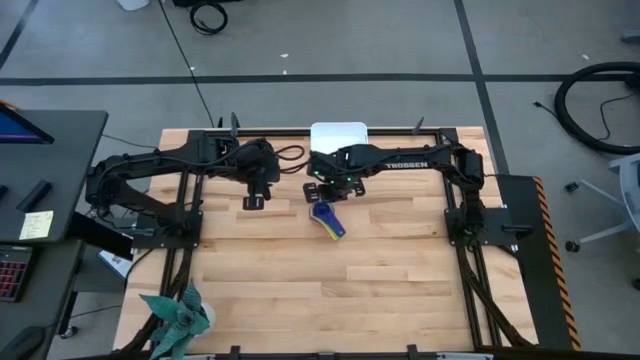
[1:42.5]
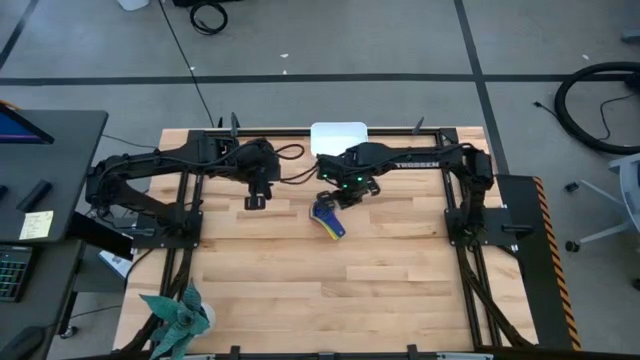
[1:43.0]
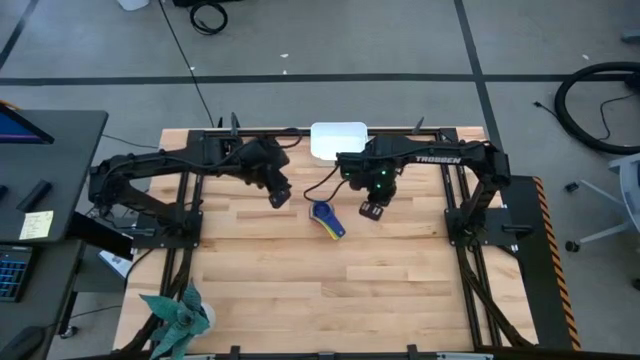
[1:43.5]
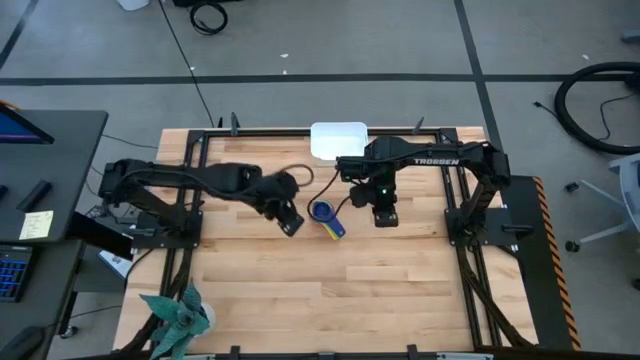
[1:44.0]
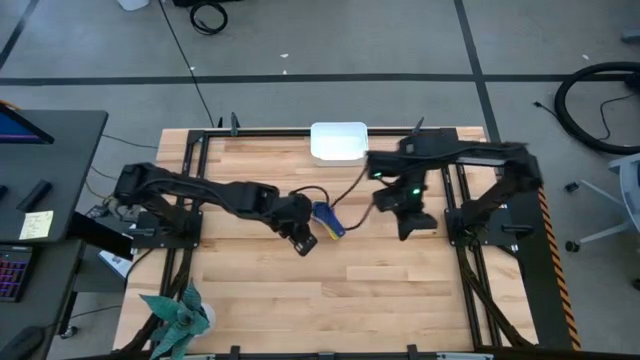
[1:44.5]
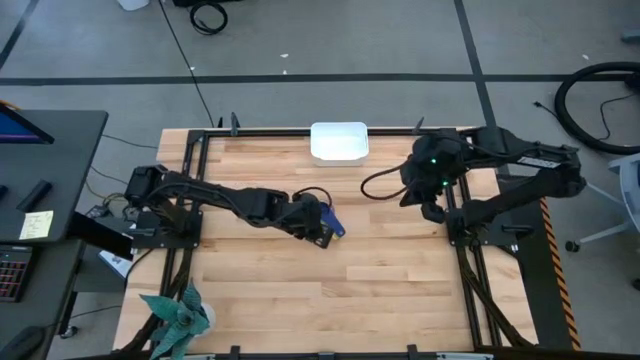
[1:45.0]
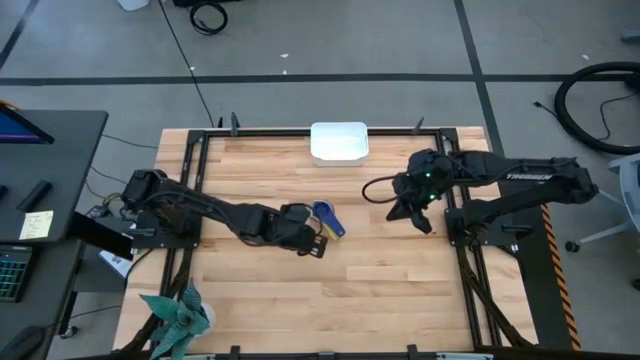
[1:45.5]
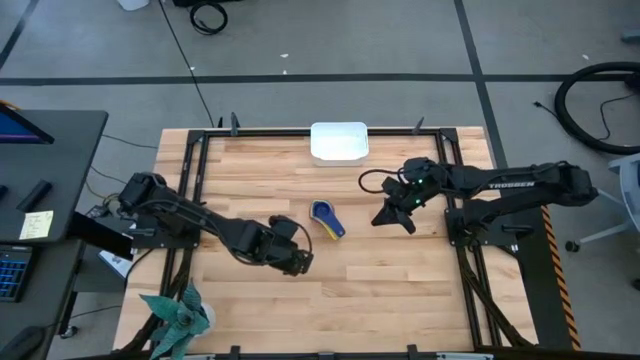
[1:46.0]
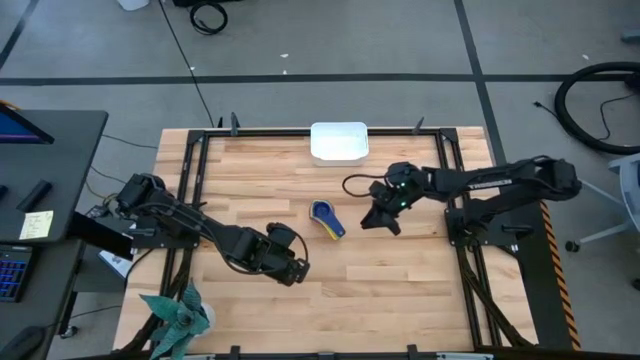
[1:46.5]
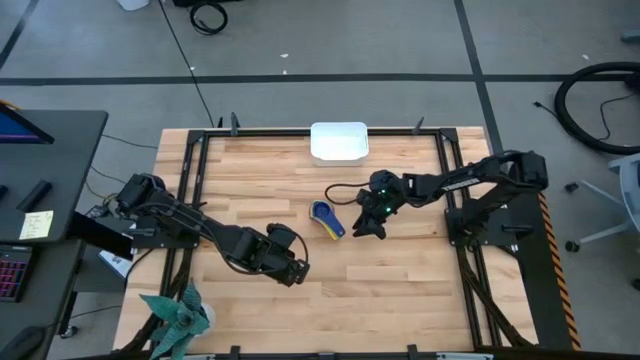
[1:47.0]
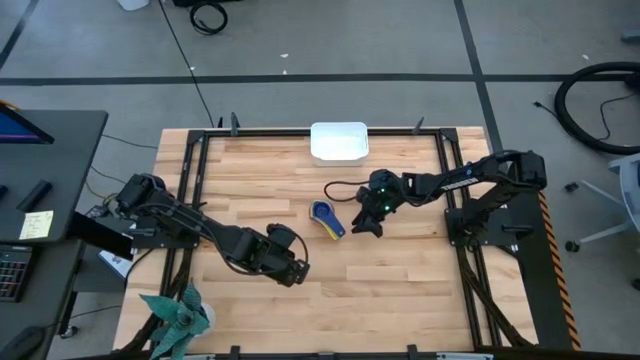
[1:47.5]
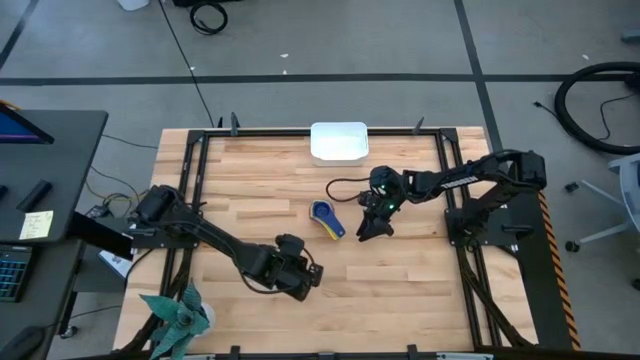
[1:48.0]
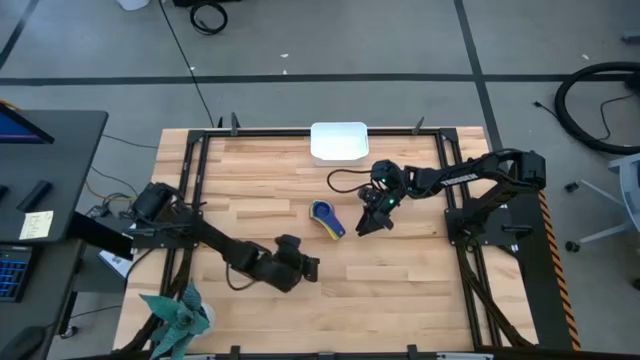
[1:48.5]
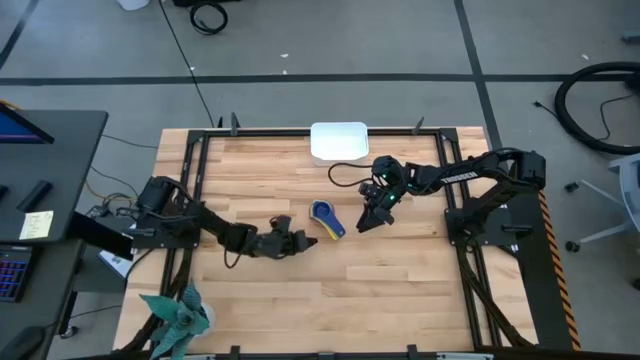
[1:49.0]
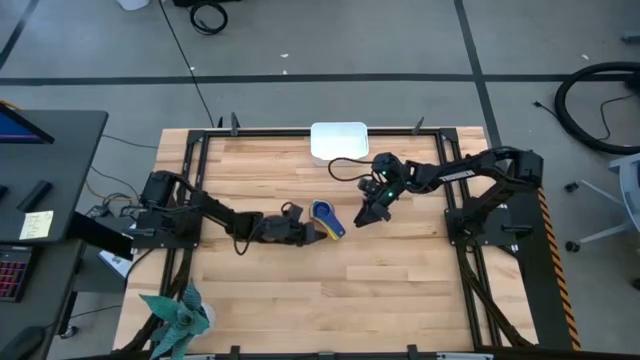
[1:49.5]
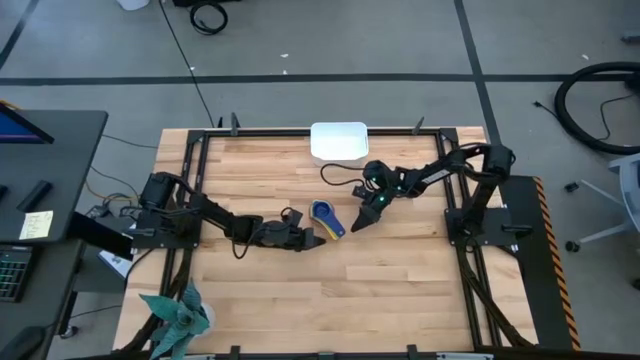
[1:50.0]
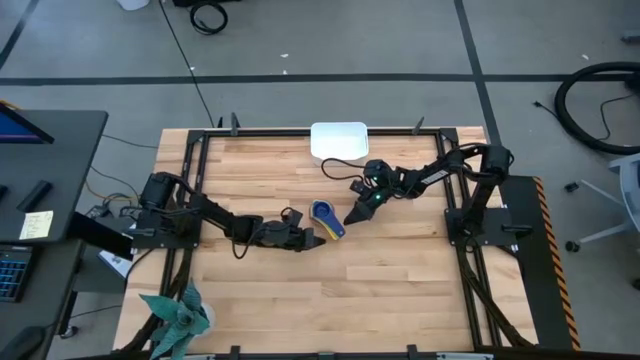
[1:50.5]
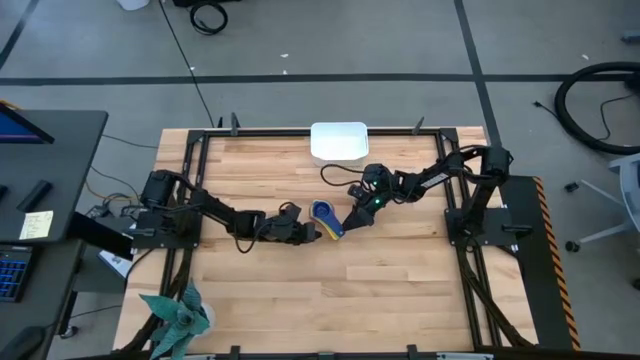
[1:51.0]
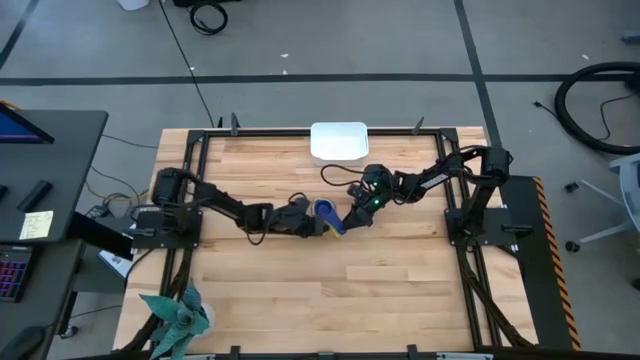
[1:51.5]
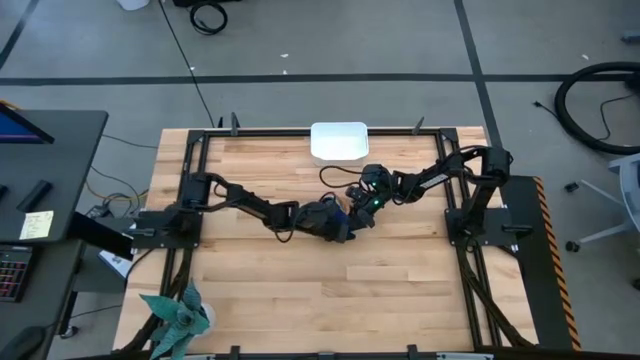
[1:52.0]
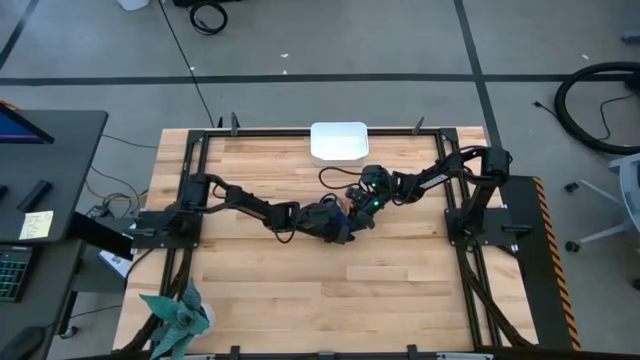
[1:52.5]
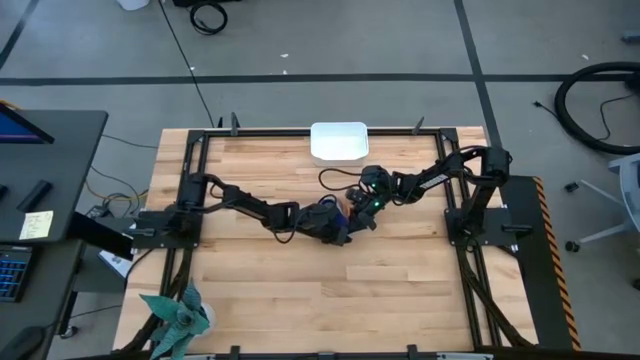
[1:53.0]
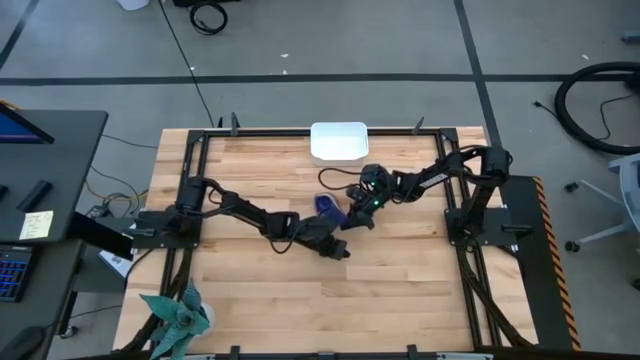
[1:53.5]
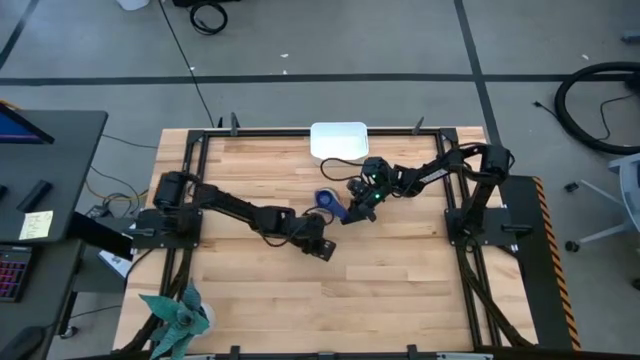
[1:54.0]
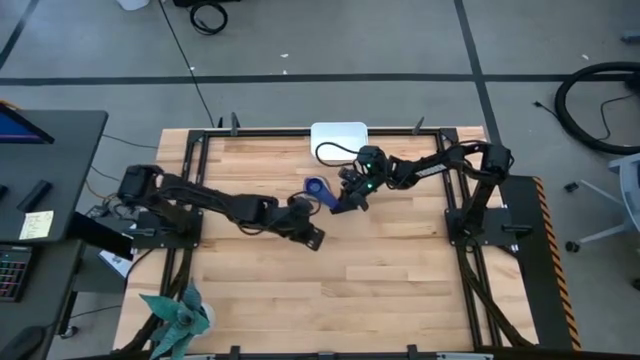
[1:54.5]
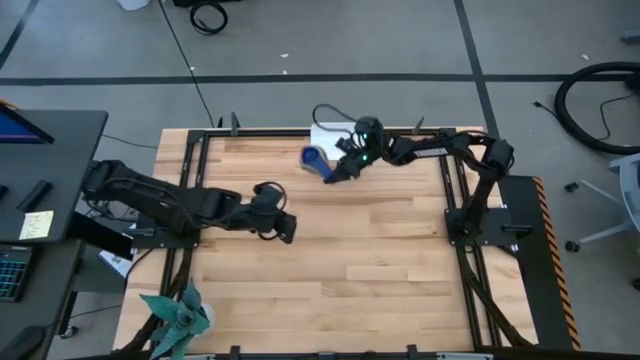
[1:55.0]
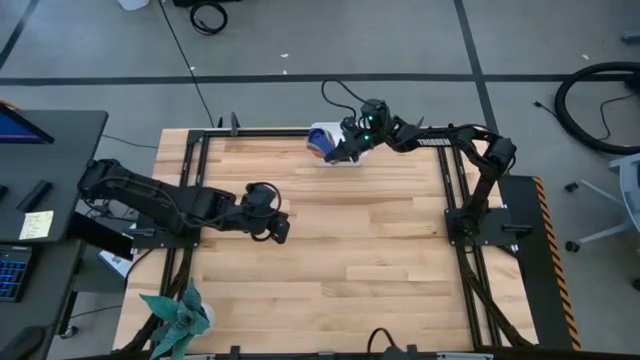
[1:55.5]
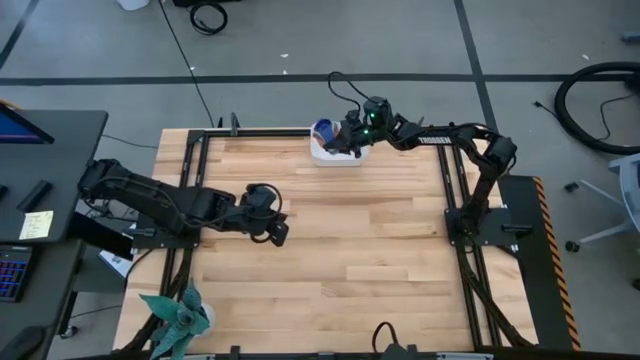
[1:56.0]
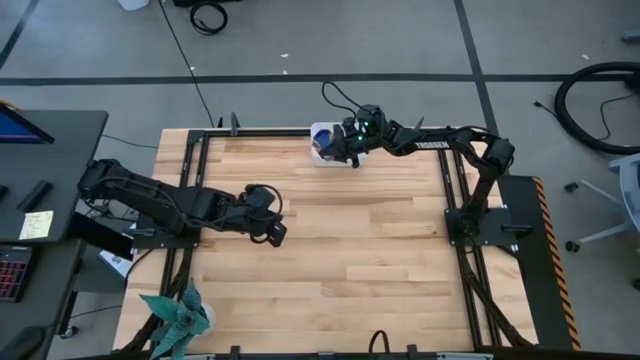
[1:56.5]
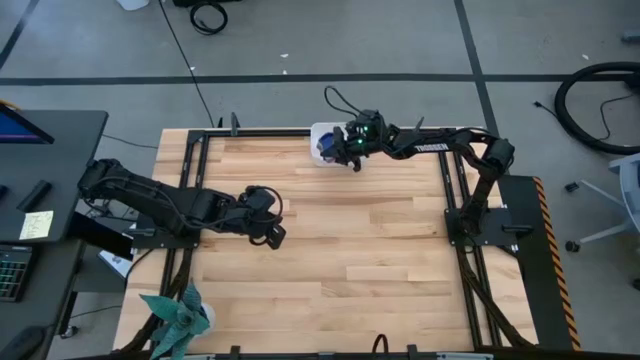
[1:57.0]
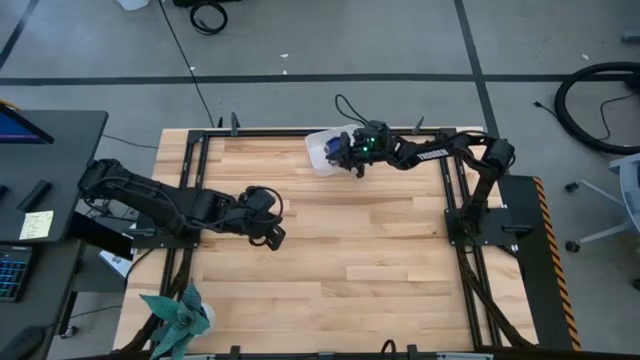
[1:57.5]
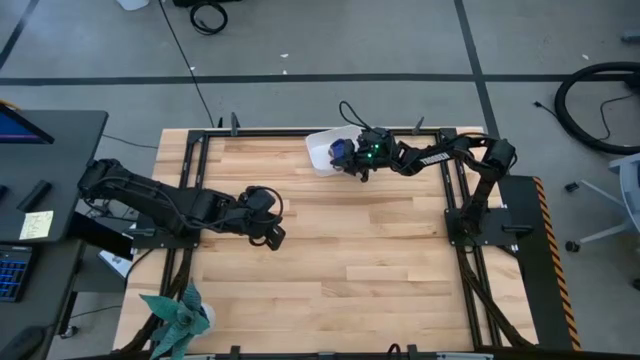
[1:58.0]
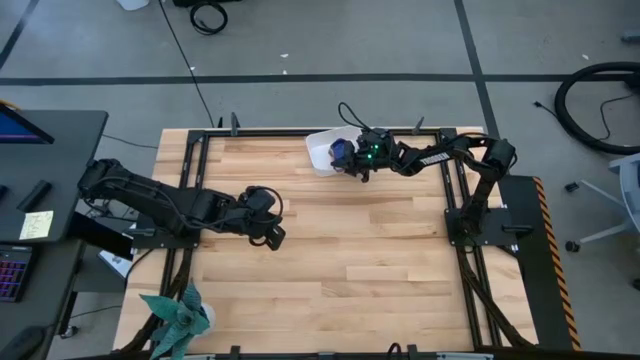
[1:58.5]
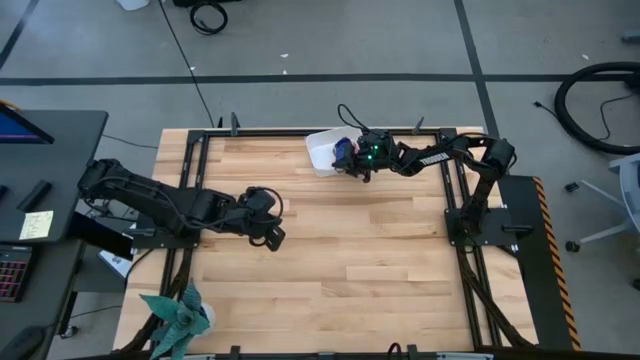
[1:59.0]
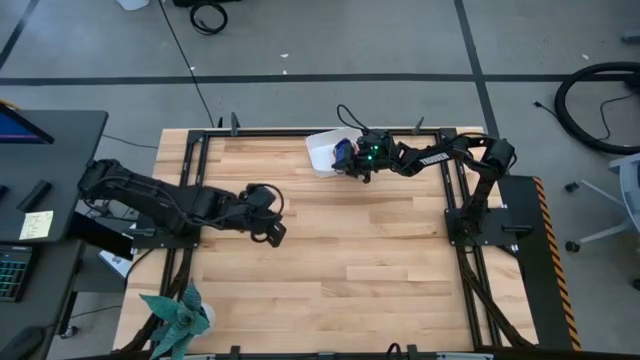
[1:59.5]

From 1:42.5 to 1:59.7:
Task: Nest measuring cups in basket
Put the nested measuring cups into the white bin

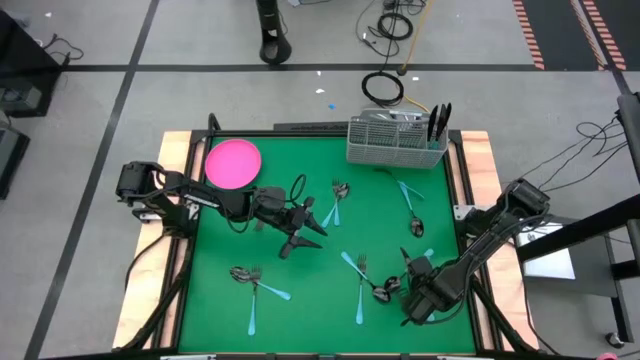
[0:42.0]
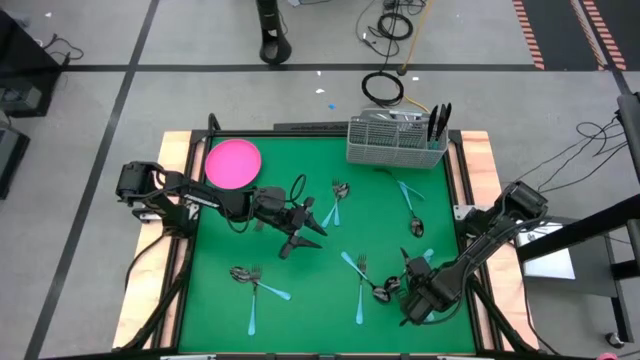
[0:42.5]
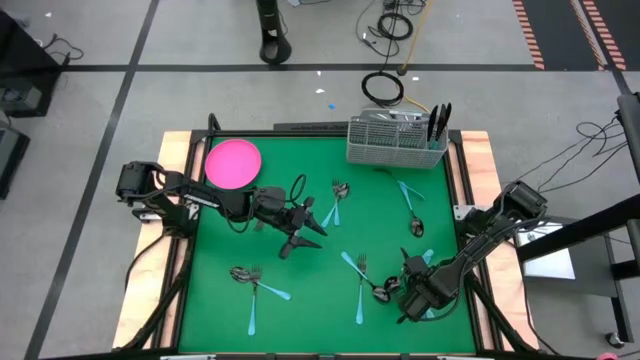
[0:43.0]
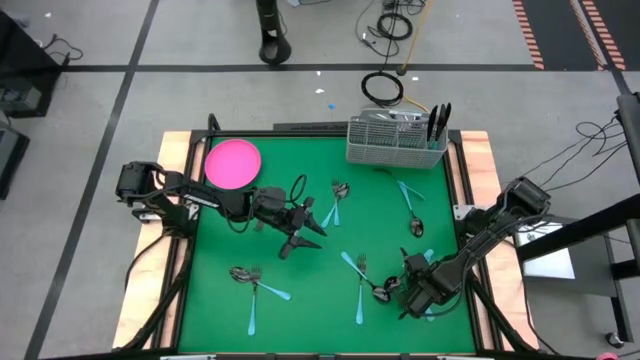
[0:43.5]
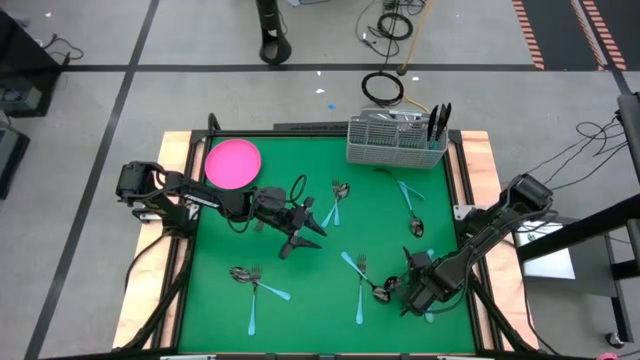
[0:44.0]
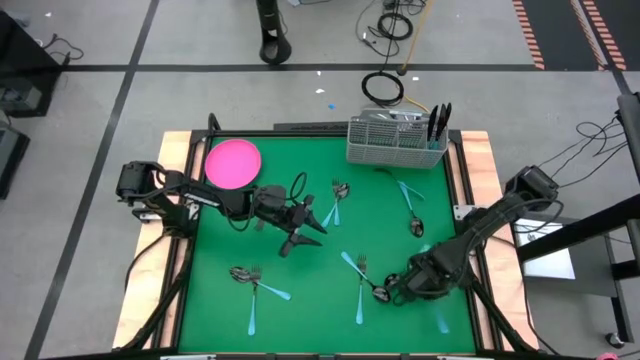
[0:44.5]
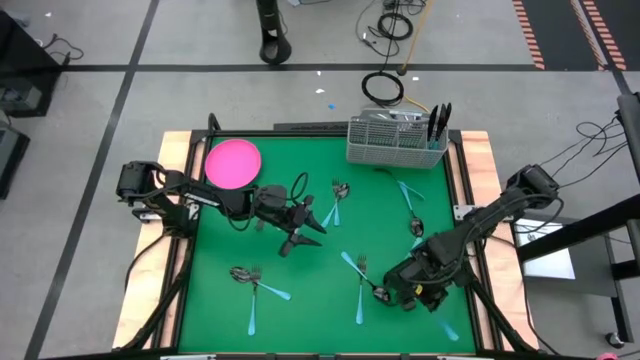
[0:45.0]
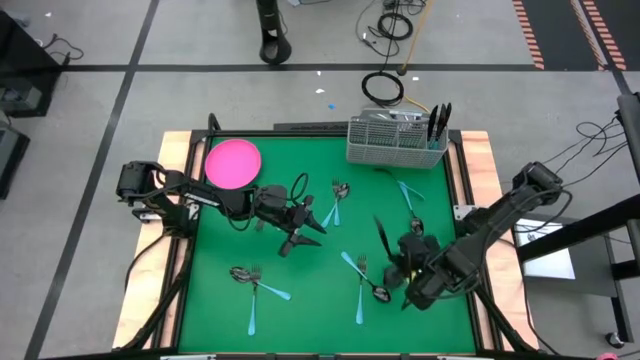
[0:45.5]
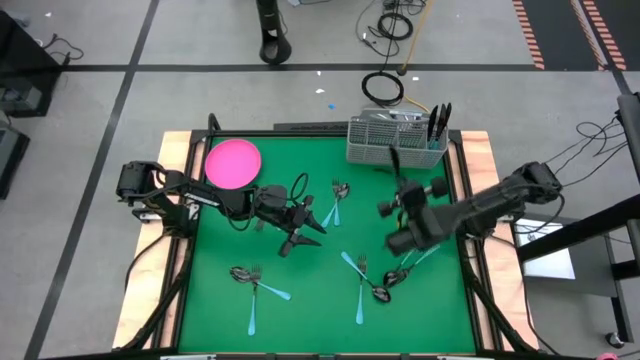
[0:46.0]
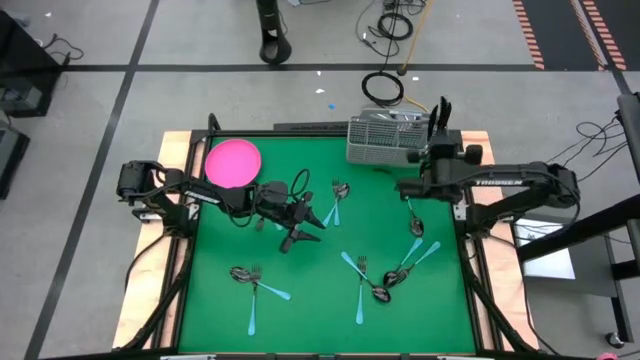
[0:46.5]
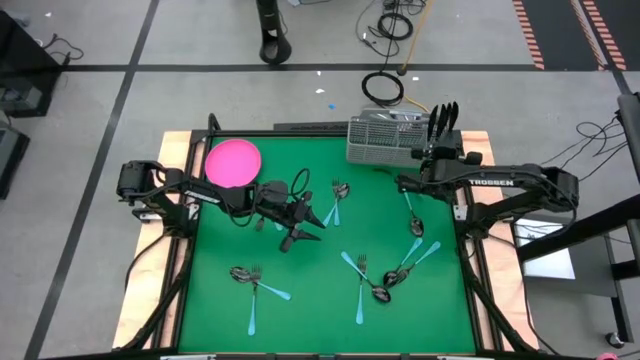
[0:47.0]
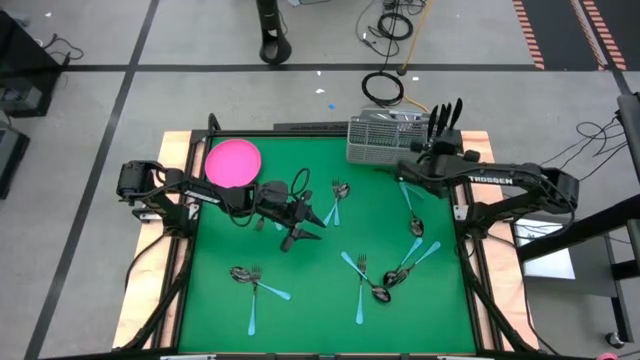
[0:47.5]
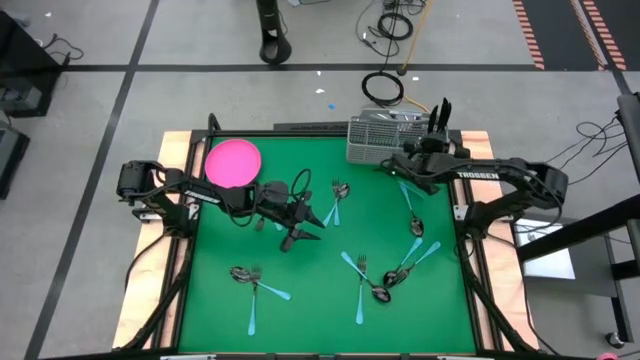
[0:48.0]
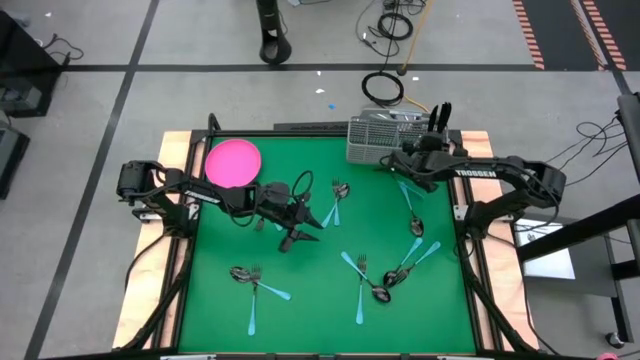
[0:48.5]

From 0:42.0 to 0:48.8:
Task: Sort silverware
Put the blue table knife into the gray silverware basket
